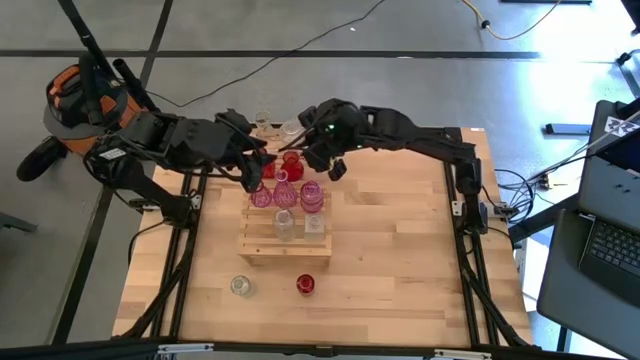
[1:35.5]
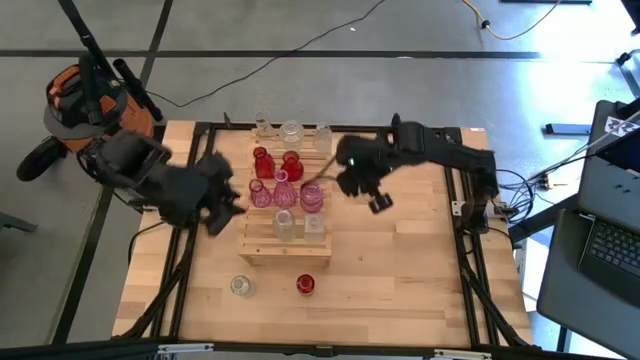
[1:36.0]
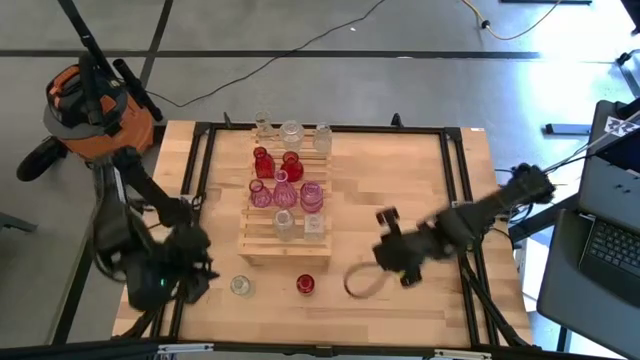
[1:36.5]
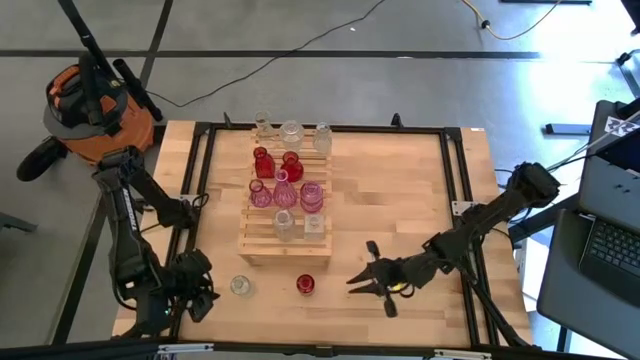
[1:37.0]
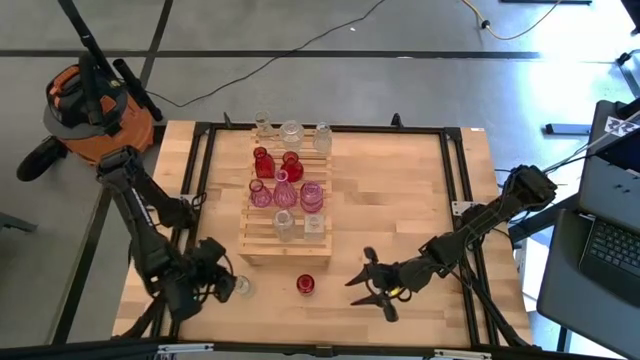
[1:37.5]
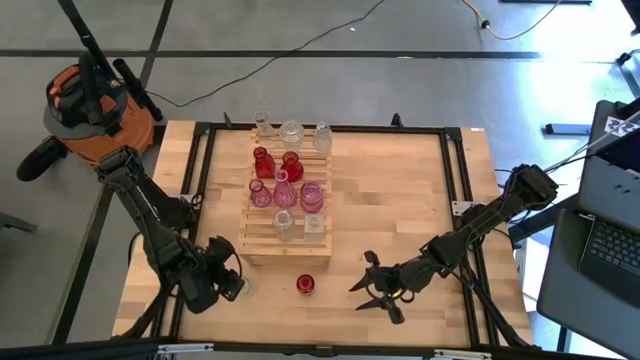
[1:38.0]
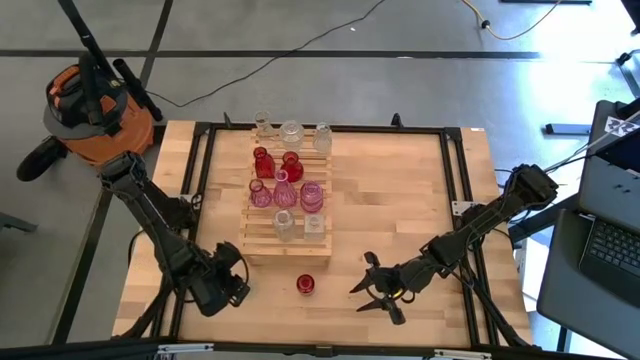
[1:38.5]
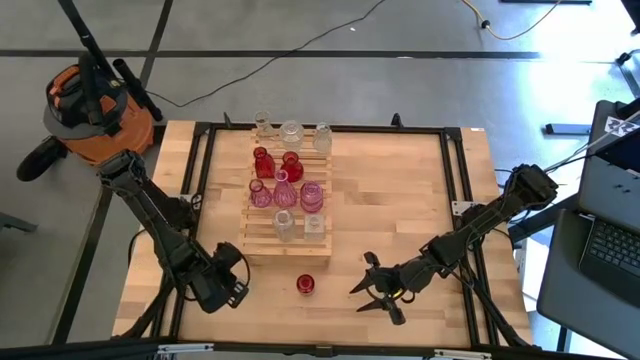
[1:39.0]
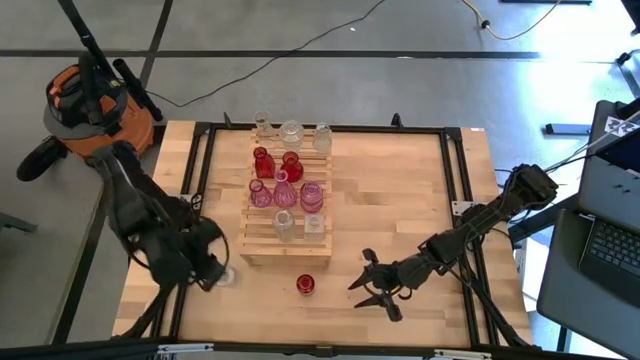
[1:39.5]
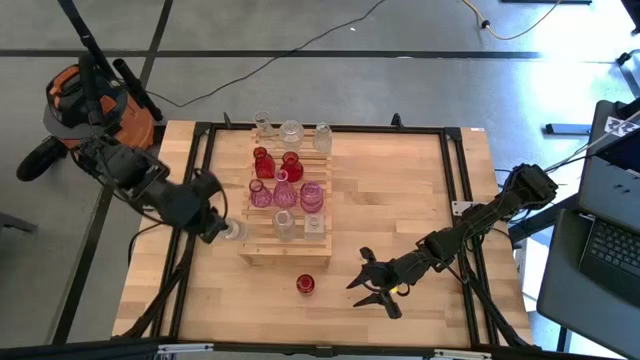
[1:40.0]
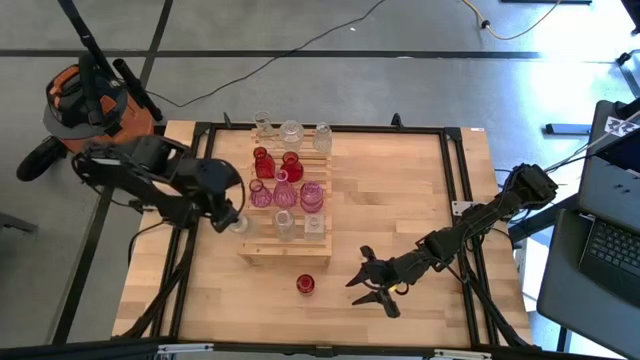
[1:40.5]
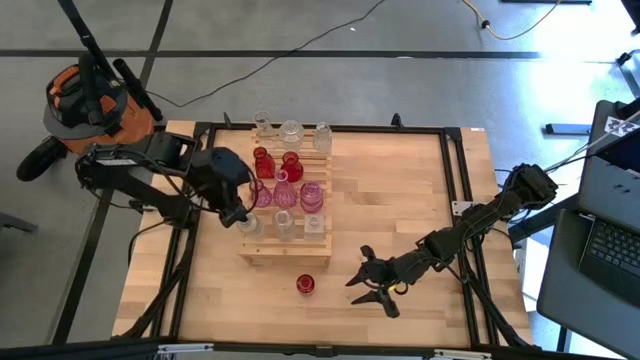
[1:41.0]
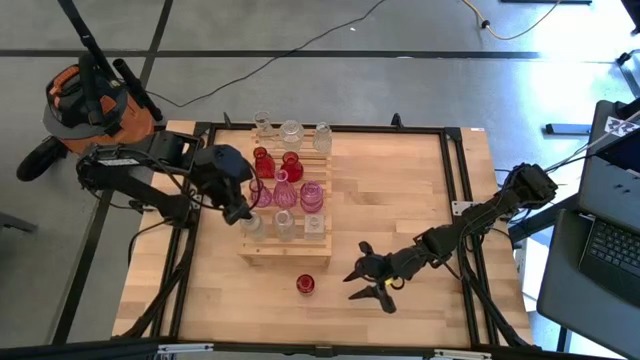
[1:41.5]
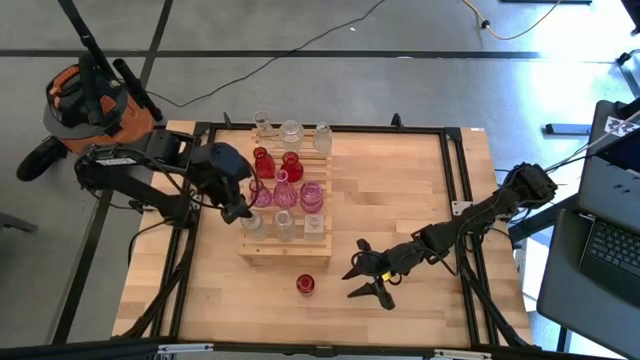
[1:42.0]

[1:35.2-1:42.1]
Task: sort vases onto shelf
Put the transparent vase on the shelf aligned with the other transparent vase

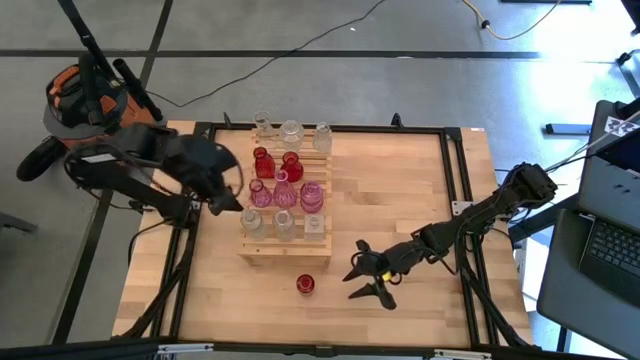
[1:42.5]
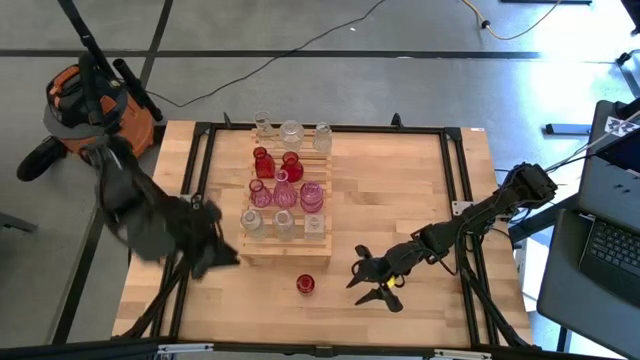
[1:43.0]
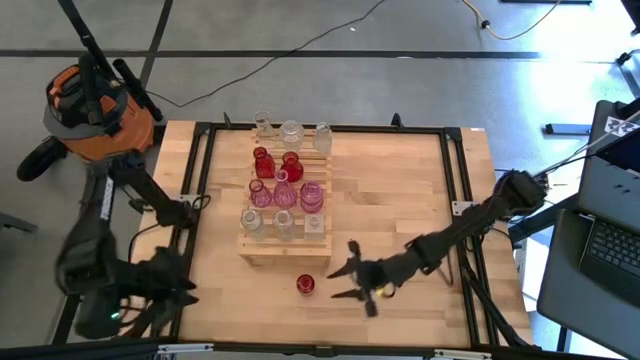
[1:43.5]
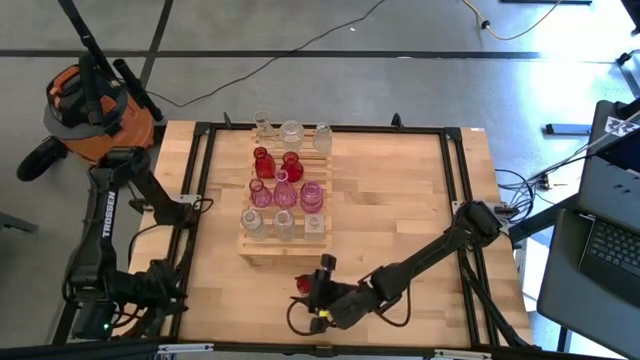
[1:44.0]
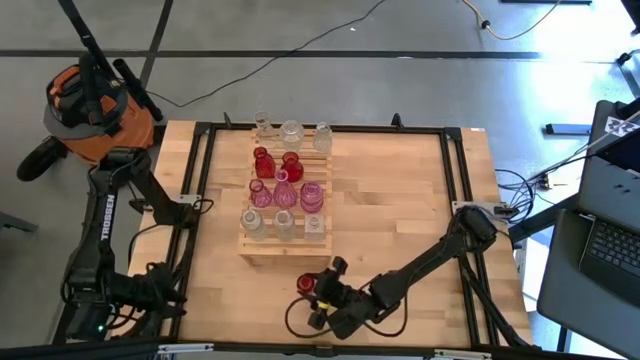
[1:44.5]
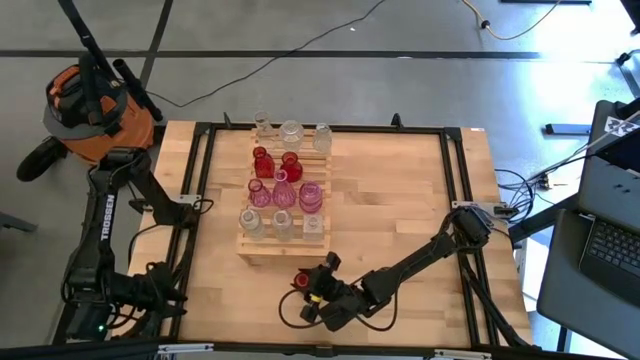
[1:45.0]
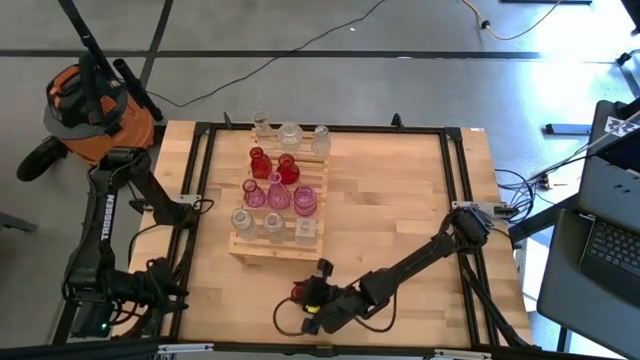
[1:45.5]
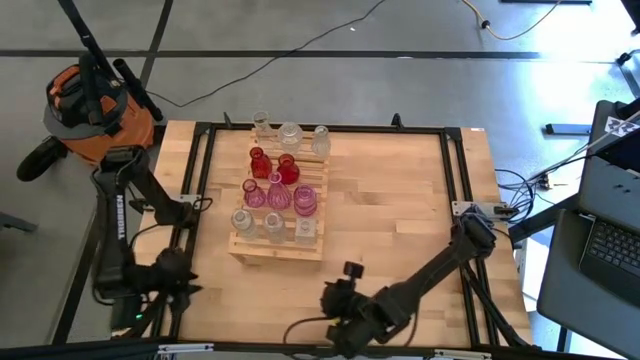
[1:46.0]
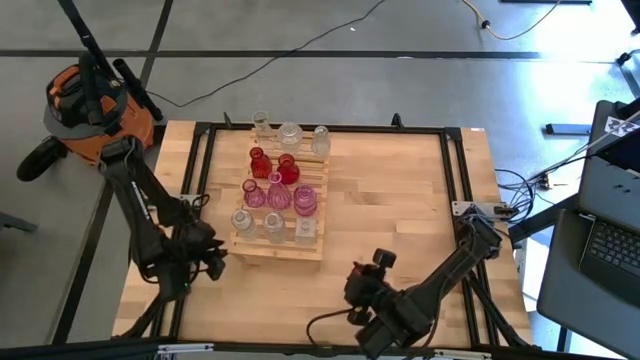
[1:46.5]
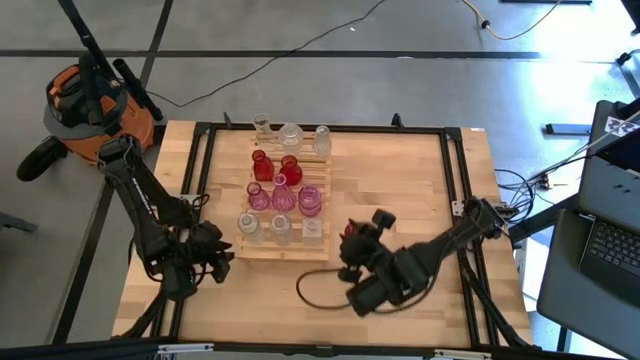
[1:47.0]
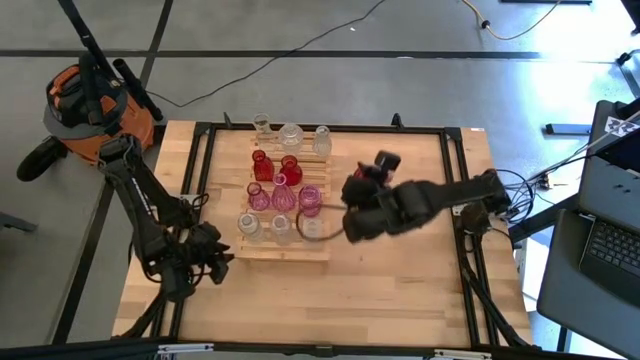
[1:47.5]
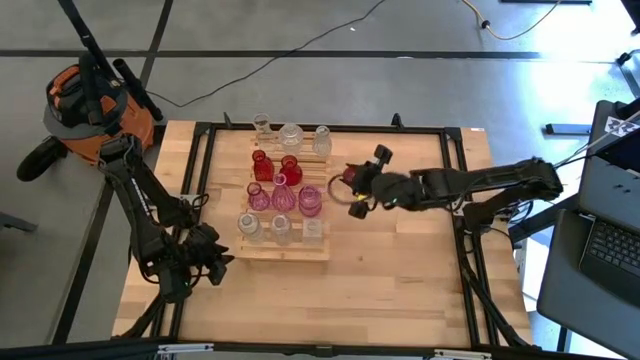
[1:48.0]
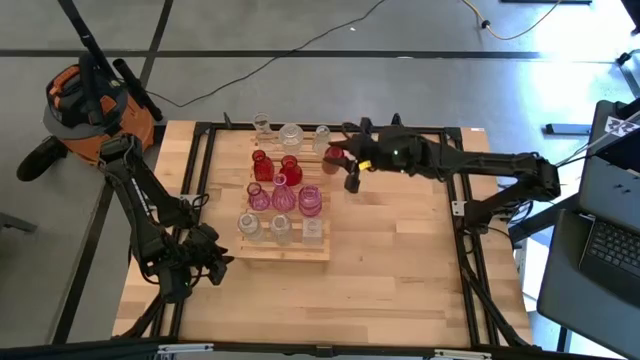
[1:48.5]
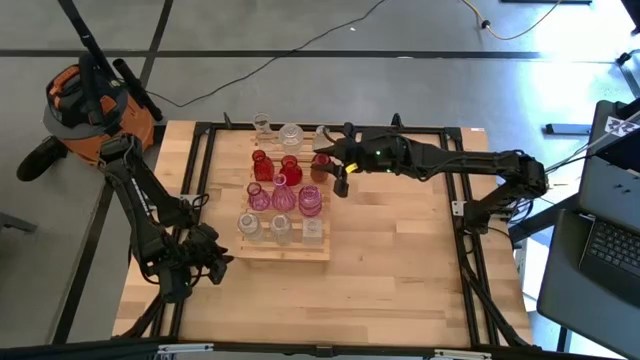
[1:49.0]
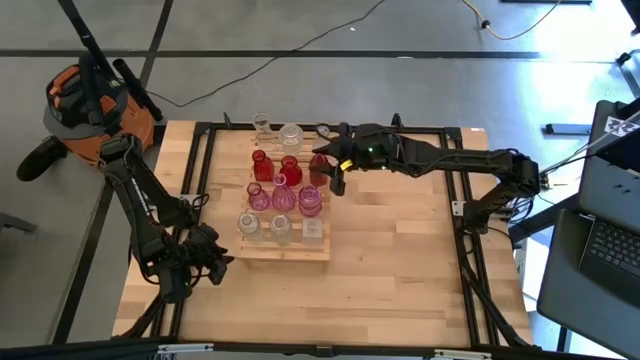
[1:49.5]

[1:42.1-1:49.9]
Put the red vase on the shelf aligned with the other red vase
